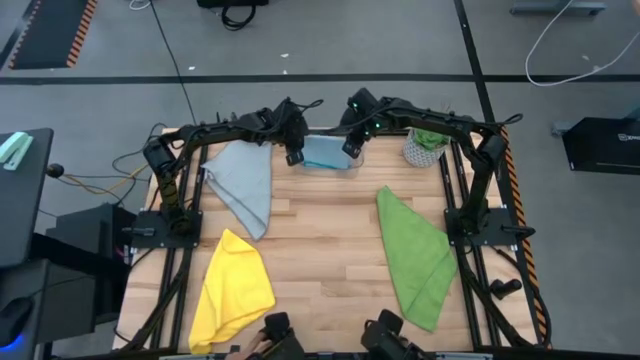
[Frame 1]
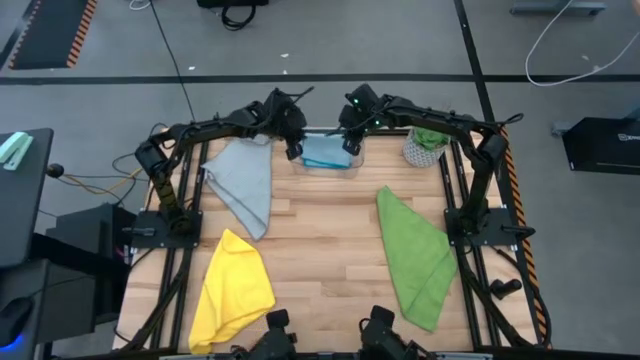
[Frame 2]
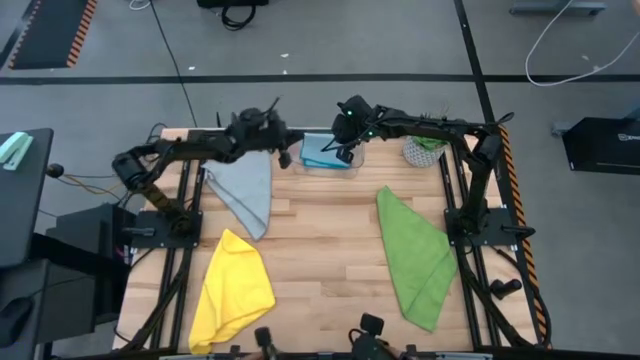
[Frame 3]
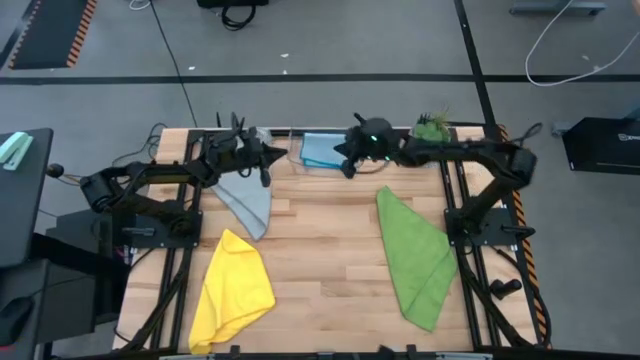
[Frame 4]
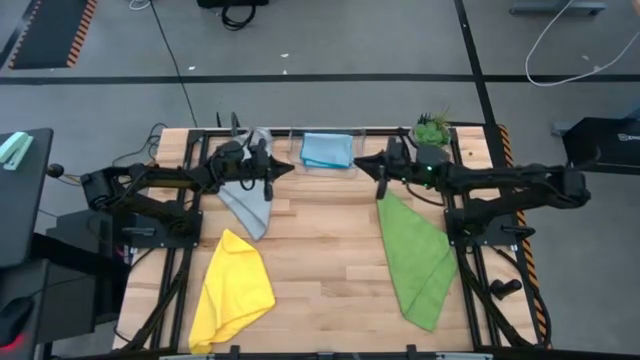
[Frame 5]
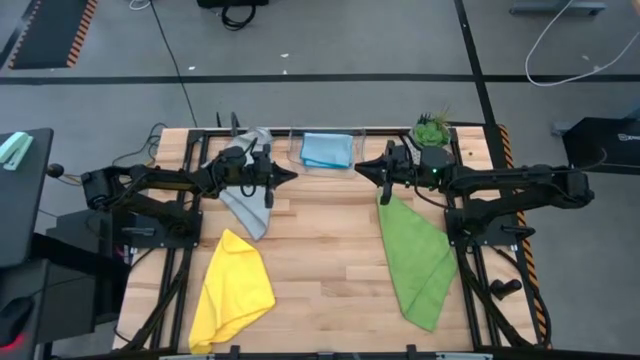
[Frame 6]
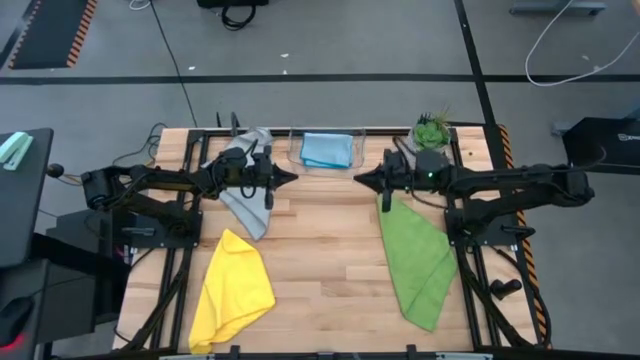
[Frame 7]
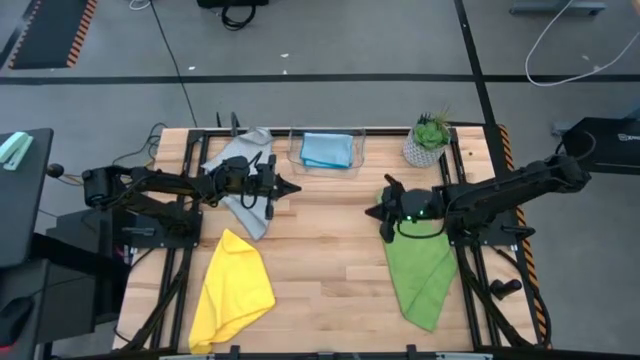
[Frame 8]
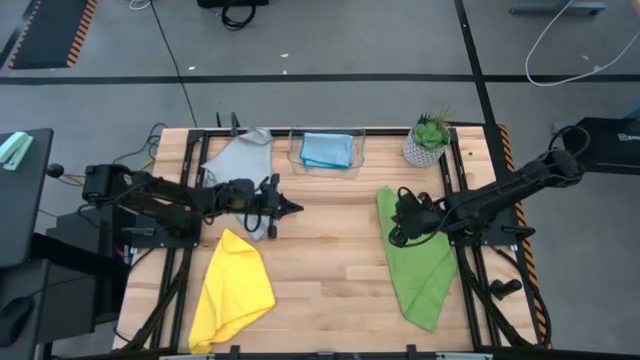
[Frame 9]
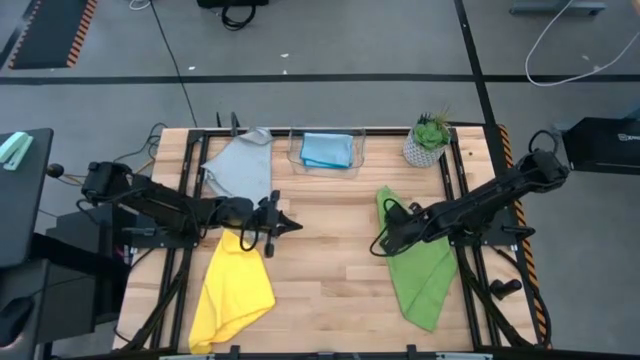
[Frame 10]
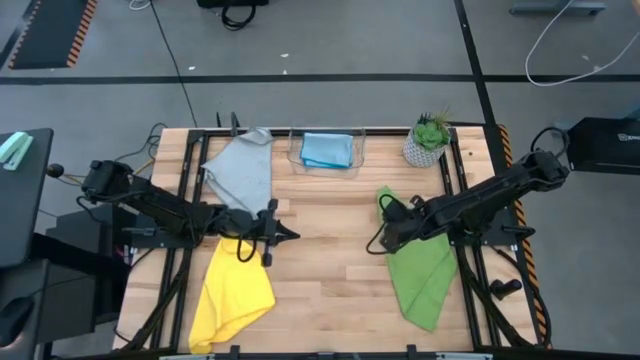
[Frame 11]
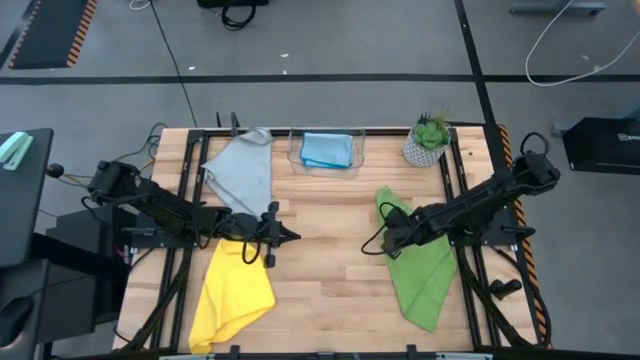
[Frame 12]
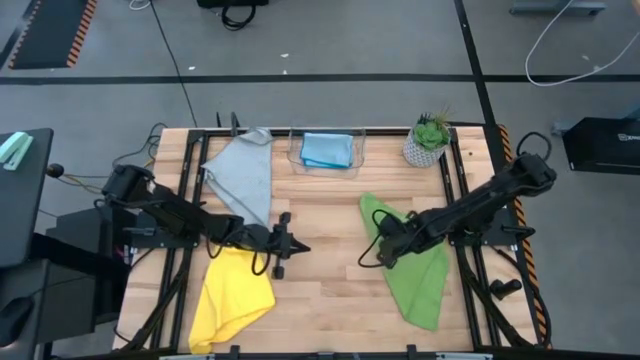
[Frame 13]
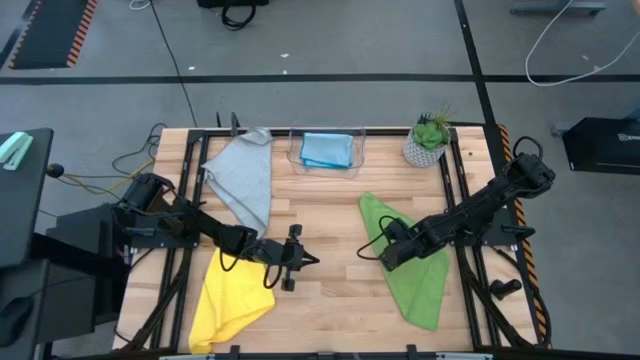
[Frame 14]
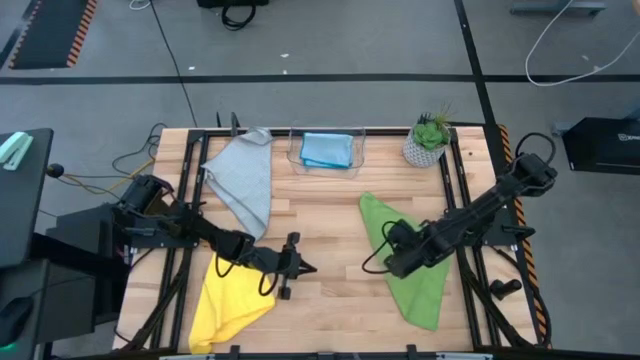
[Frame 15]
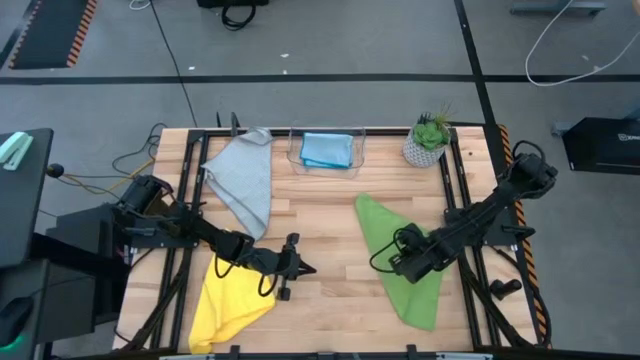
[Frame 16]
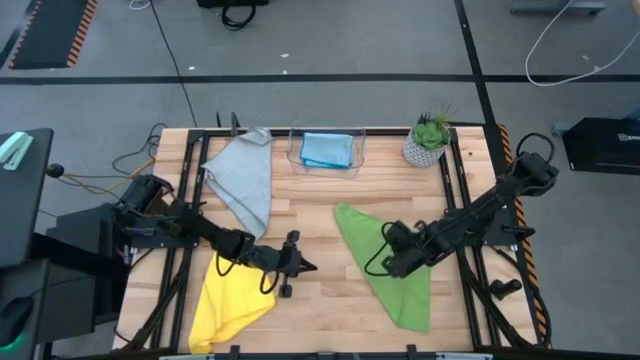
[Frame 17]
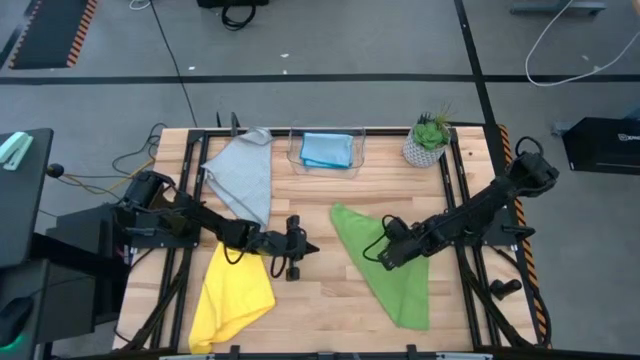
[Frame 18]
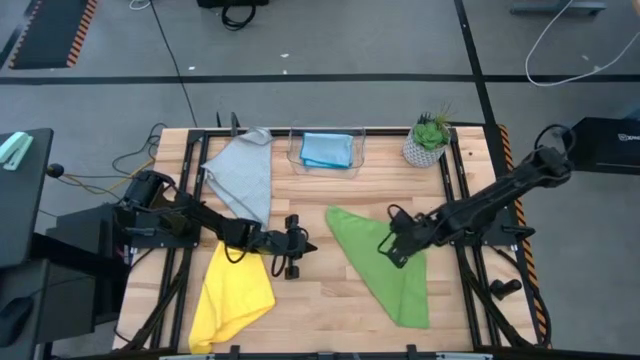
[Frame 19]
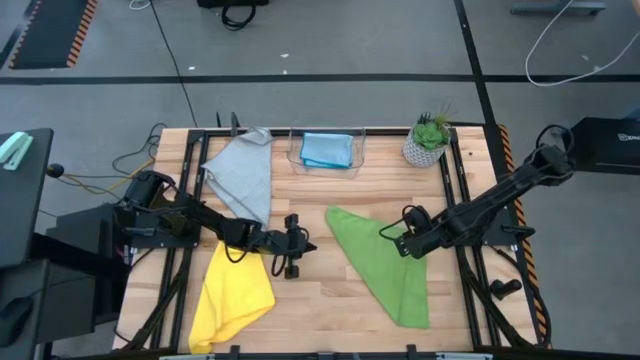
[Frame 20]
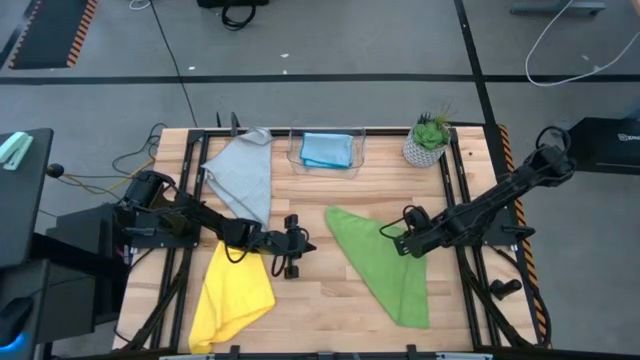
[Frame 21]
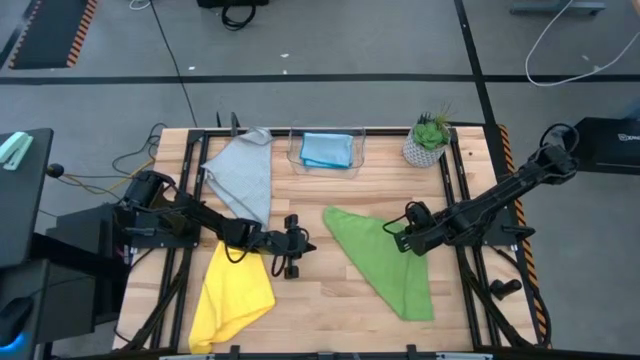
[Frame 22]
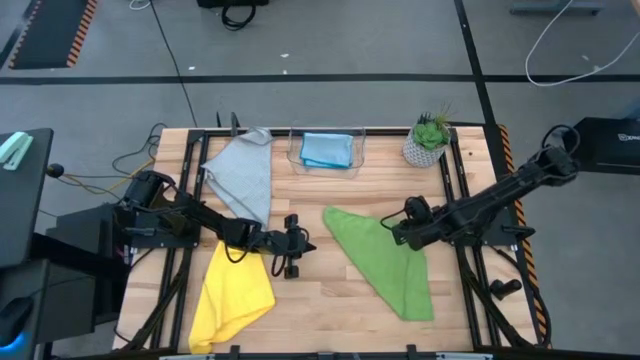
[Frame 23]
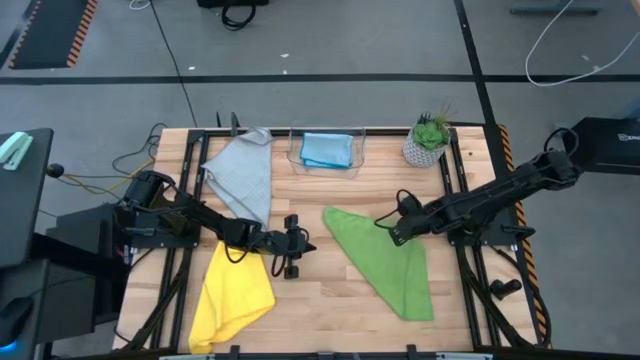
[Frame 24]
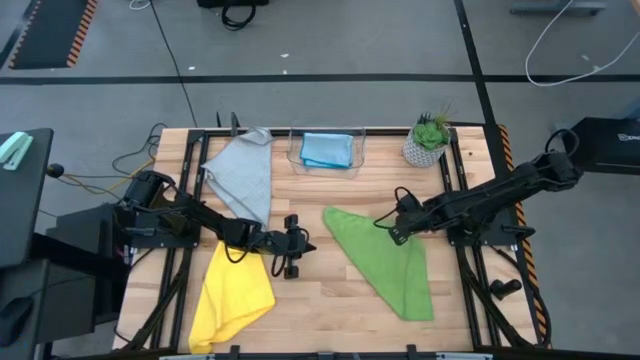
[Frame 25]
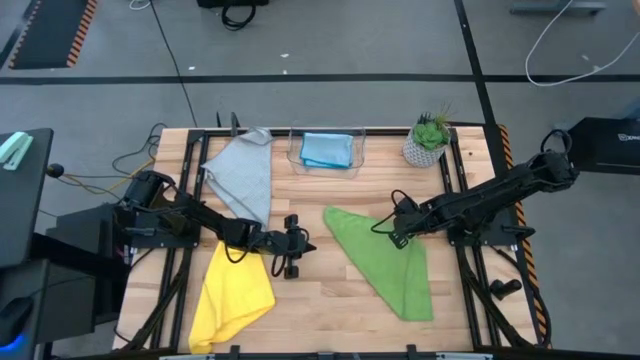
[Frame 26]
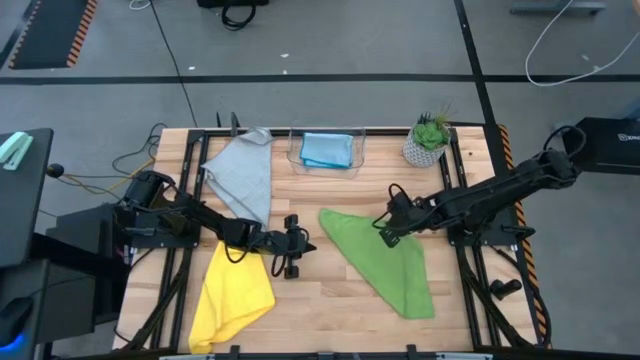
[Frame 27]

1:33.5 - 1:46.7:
Task: Fold microfiber towels
Fold the green microfiber towel
